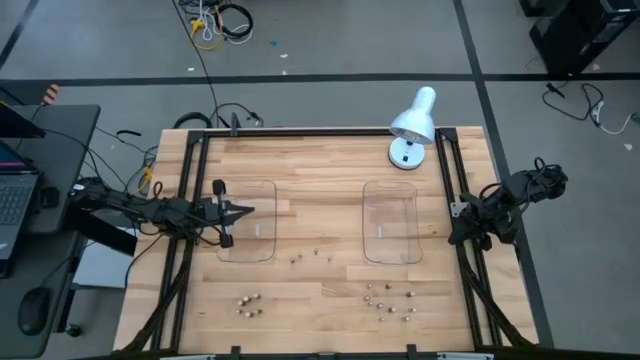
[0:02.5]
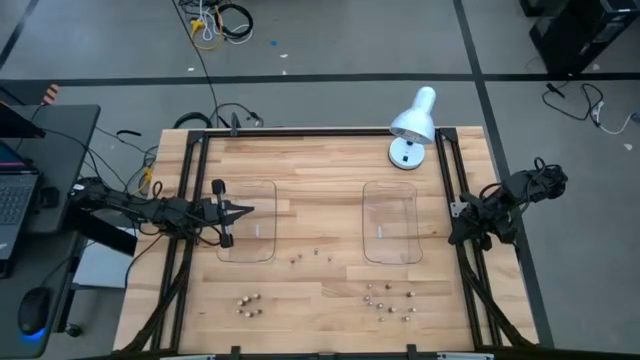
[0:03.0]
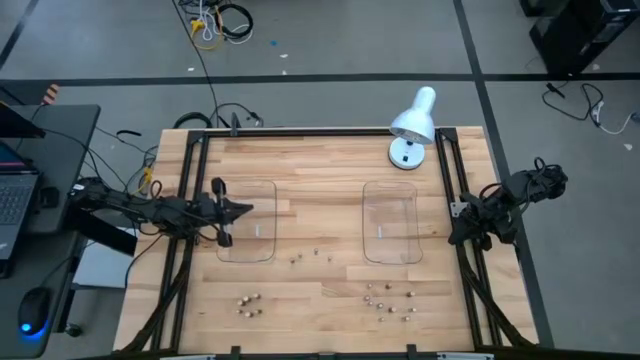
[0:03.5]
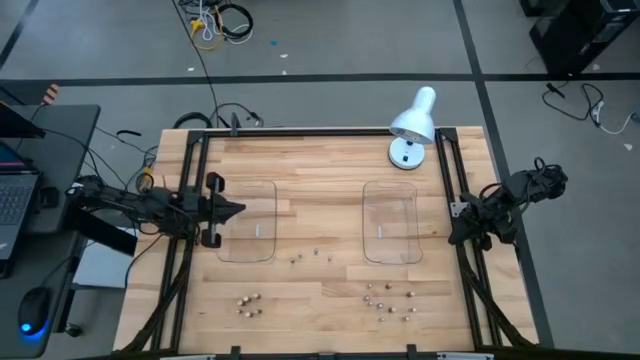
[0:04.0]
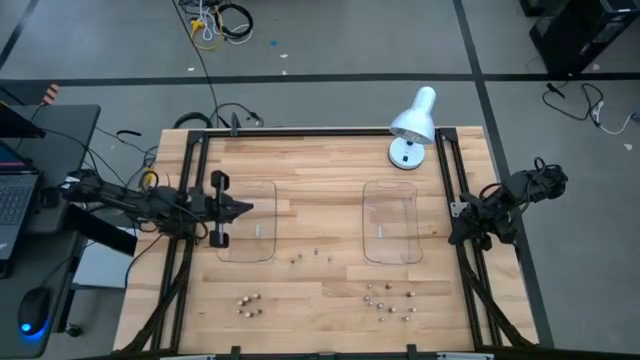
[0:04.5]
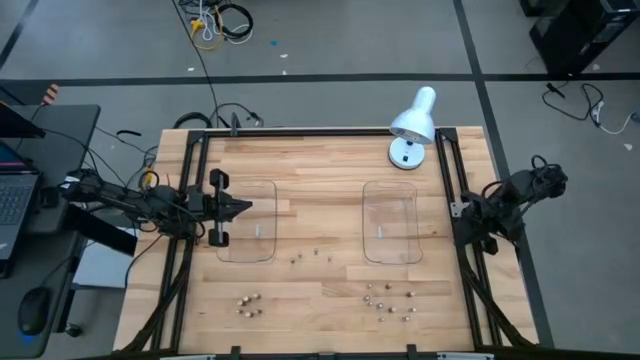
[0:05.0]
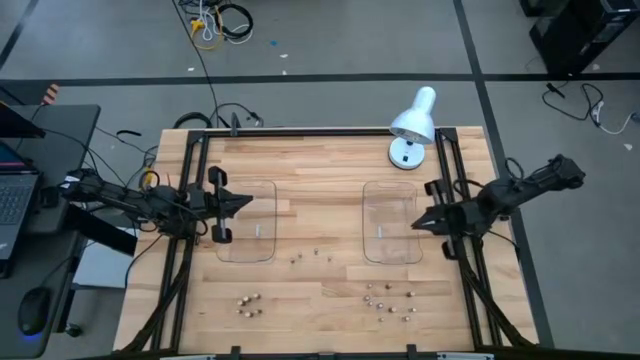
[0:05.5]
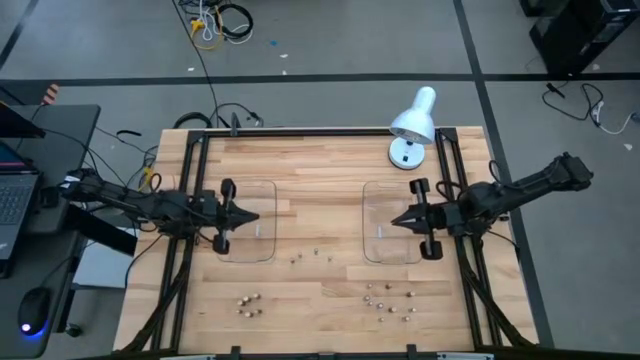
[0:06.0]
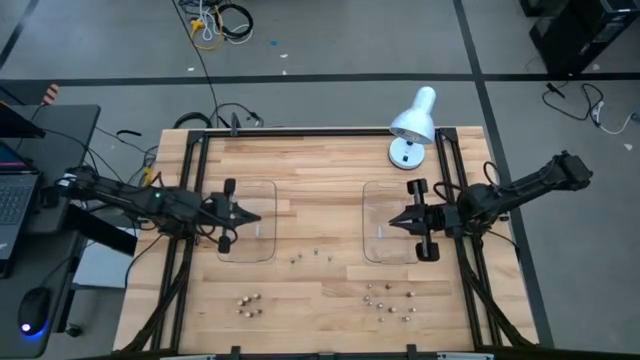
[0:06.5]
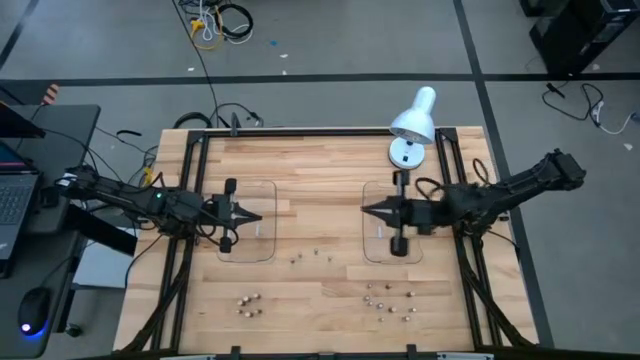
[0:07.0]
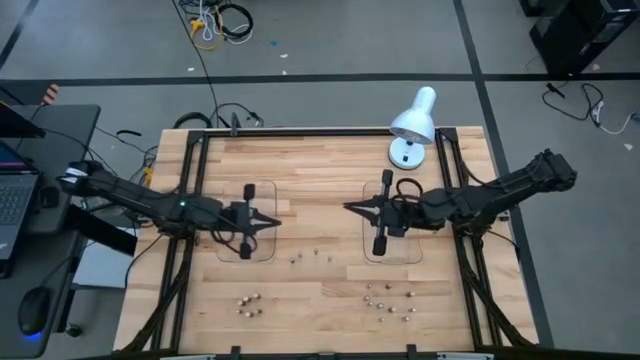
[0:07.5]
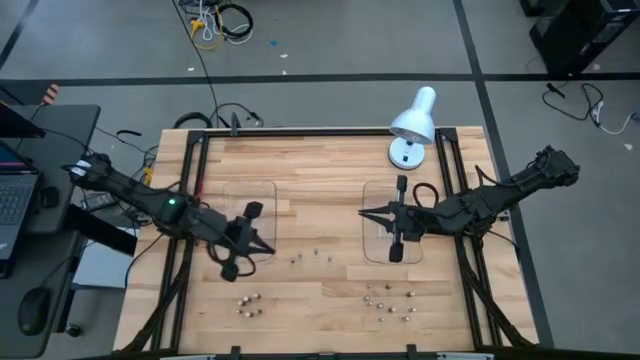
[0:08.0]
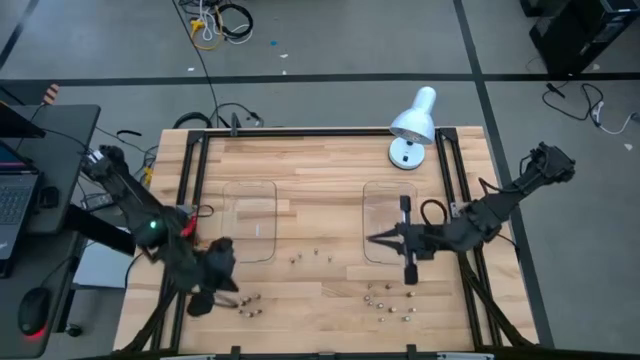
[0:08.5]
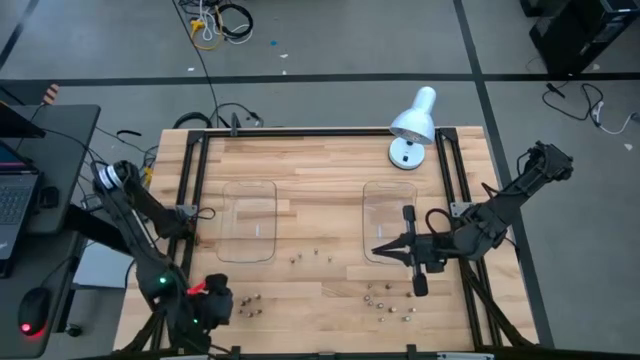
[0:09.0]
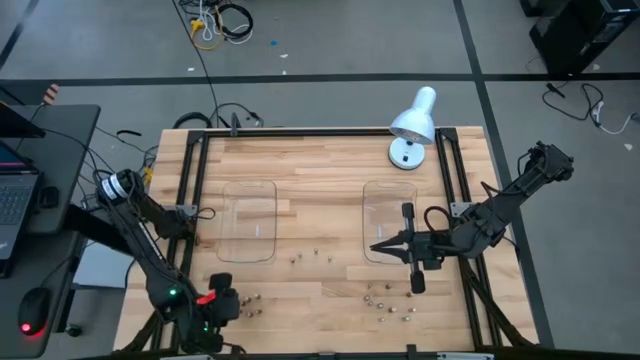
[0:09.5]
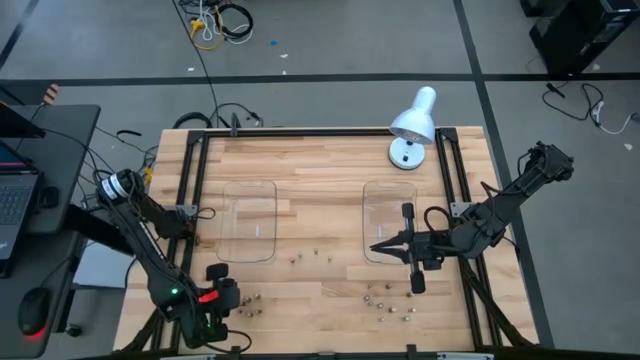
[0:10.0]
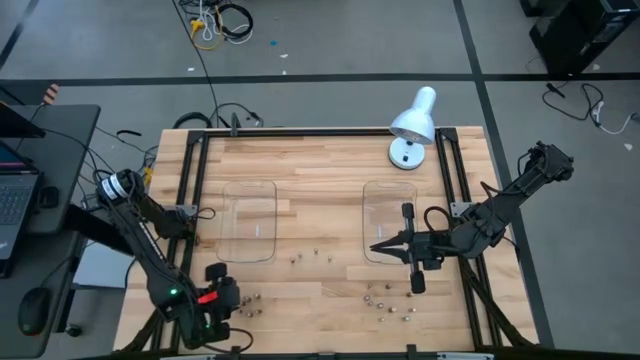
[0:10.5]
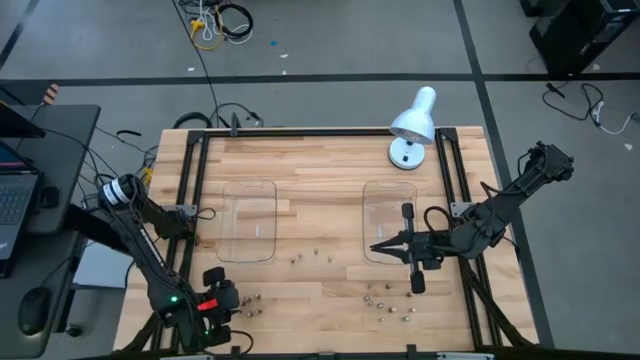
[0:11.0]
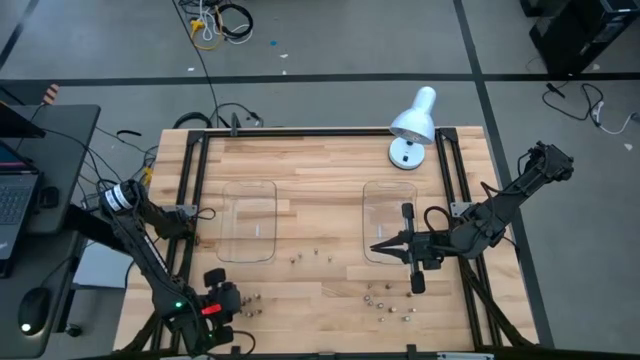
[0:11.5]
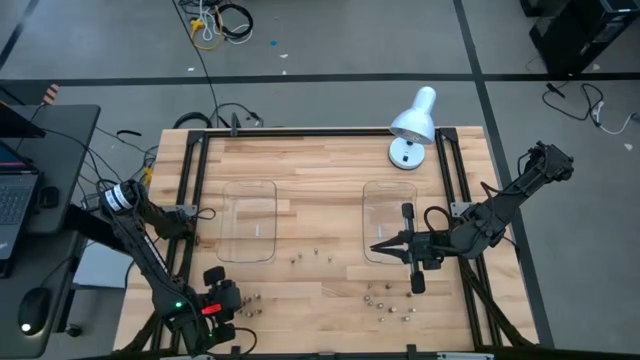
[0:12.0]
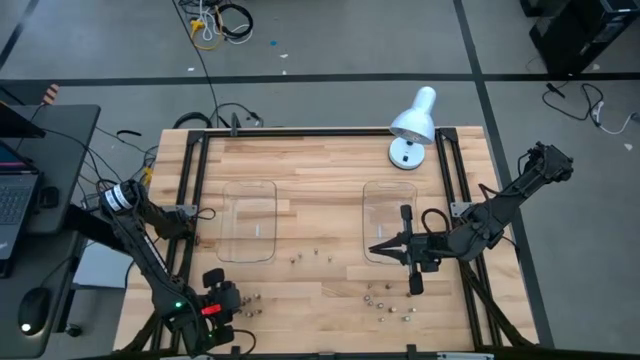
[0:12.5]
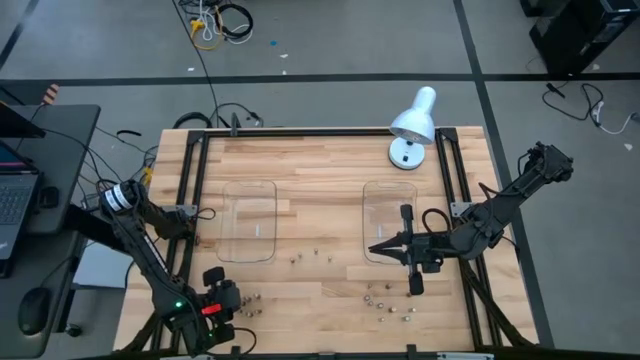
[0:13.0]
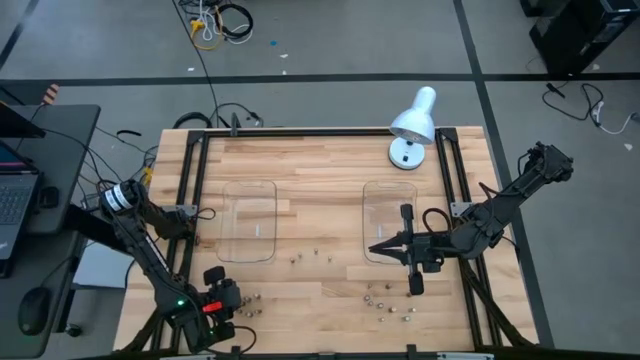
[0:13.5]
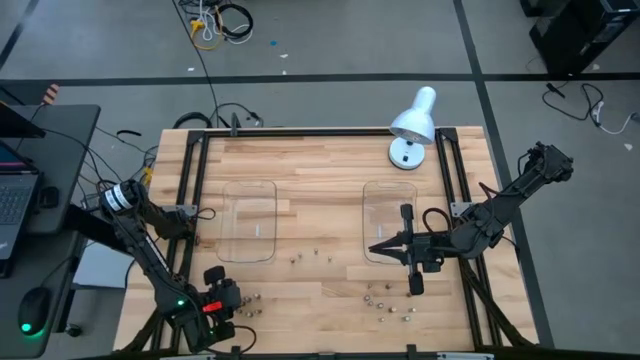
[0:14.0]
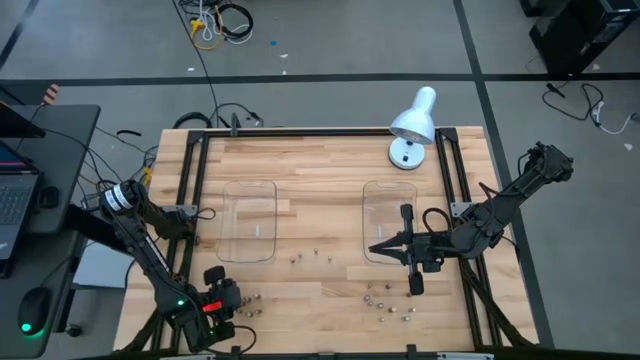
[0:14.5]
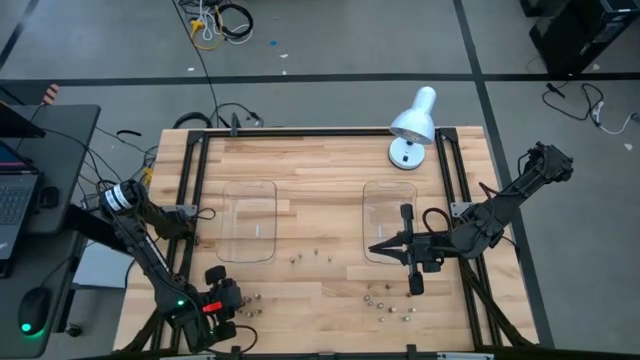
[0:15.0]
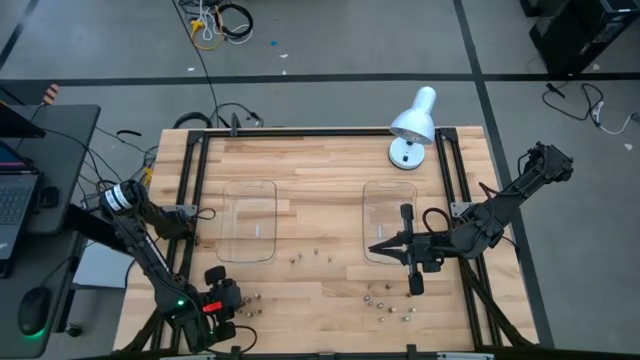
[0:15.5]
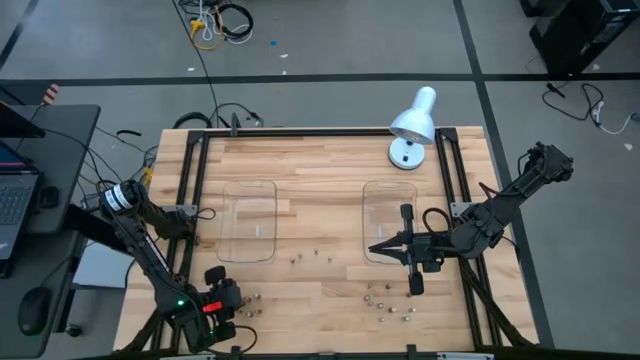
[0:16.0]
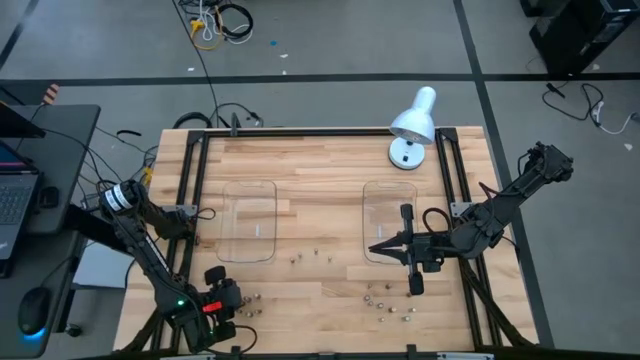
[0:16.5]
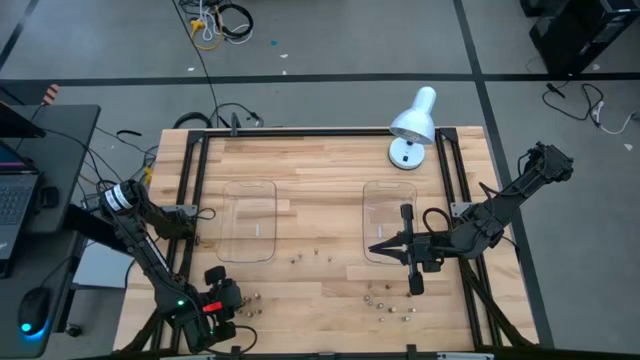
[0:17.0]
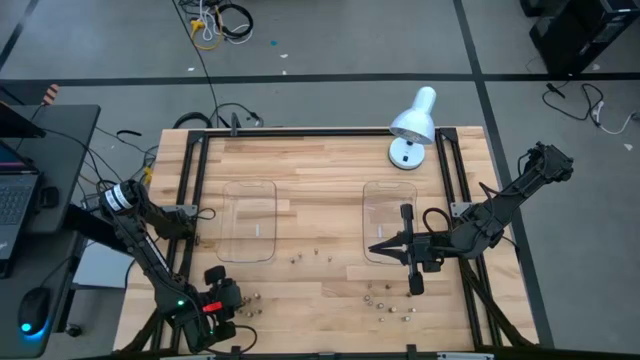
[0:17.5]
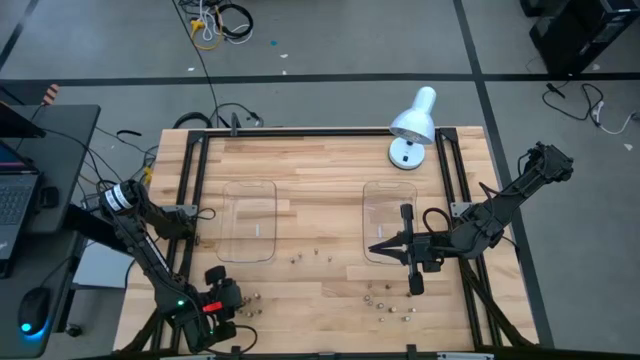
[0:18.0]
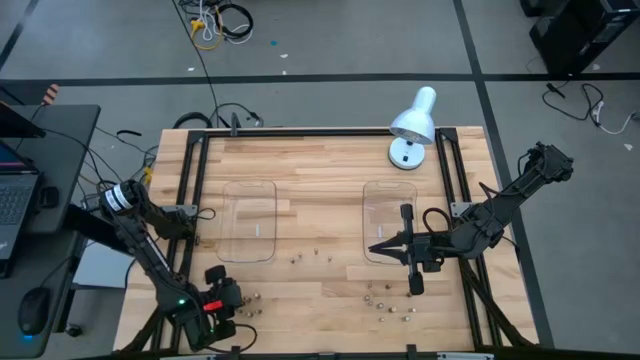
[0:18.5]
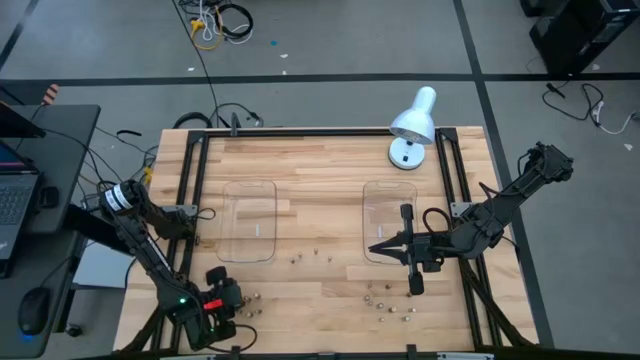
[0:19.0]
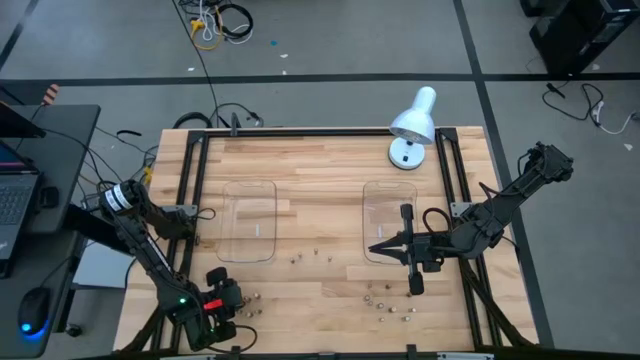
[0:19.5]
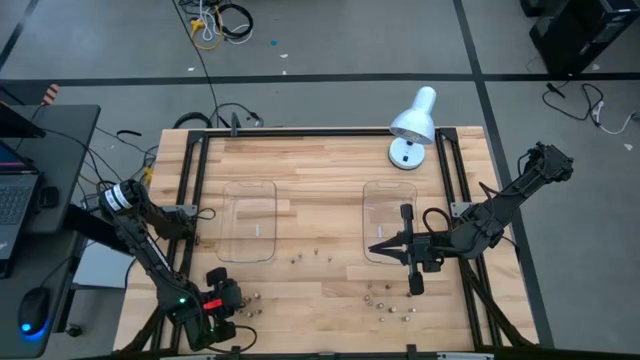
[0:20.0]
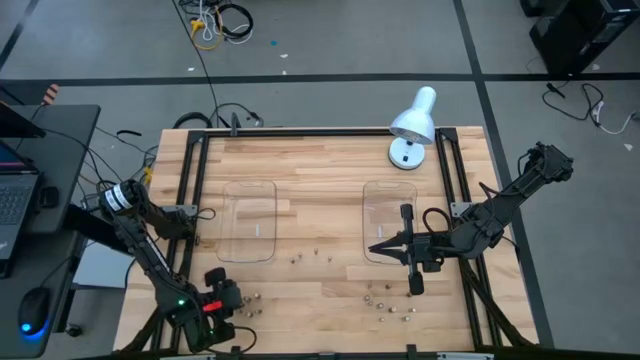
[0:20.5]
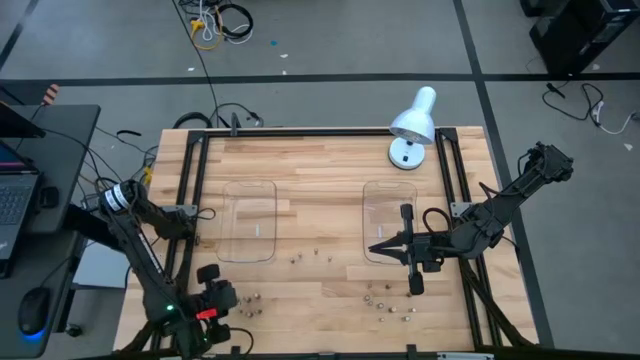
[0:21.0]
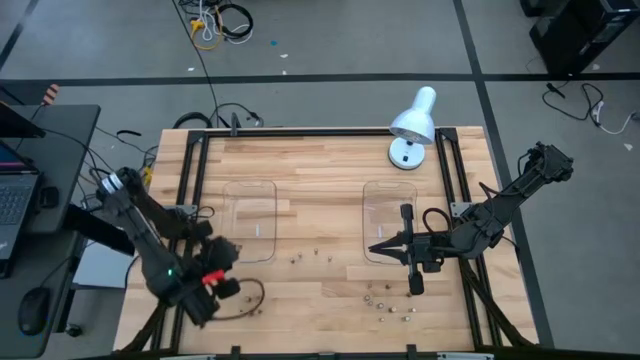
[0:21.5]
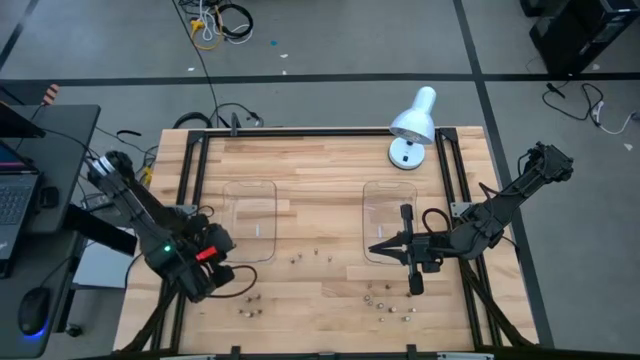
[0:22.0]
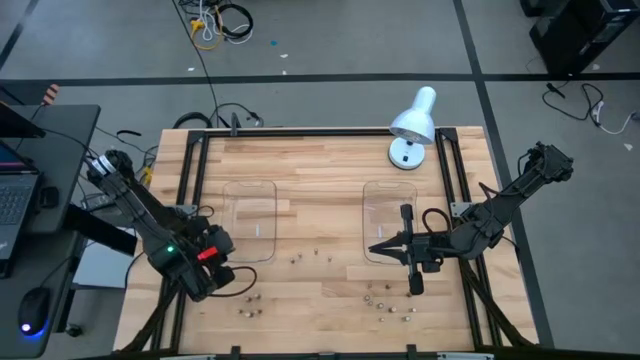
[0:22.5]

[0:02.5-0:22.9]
Task: Sort batteries
Put the black battery into the left transparent bin
